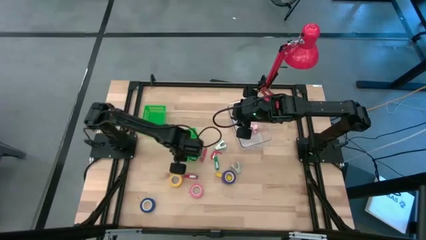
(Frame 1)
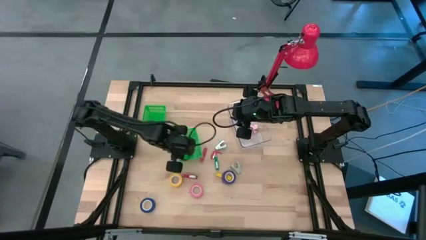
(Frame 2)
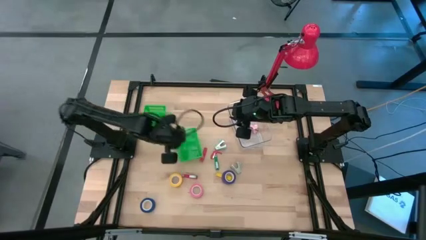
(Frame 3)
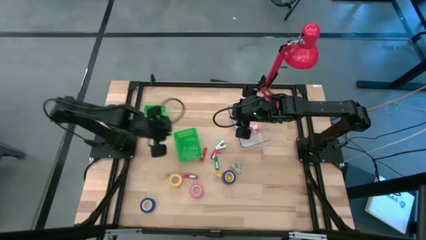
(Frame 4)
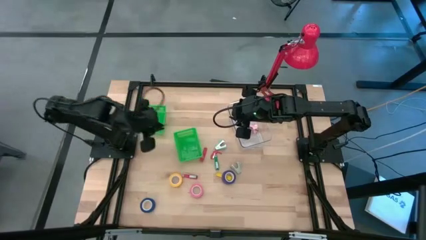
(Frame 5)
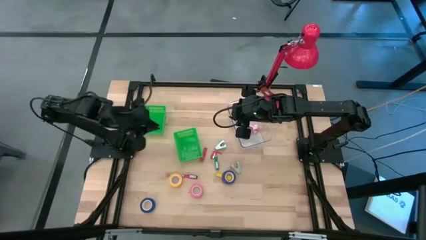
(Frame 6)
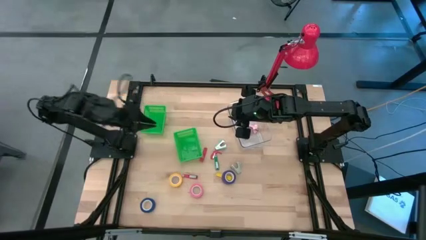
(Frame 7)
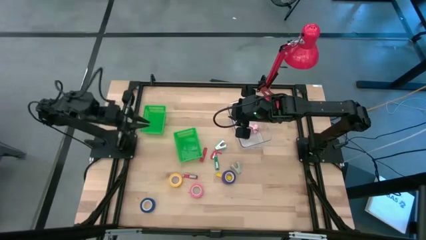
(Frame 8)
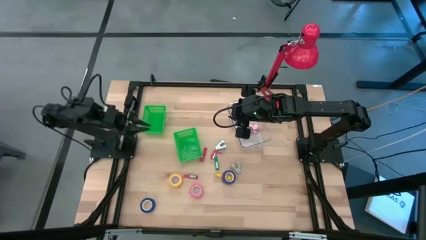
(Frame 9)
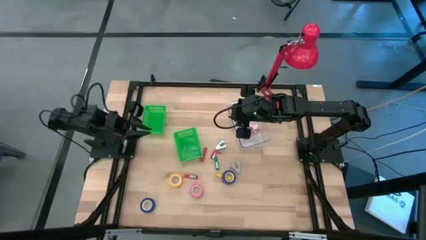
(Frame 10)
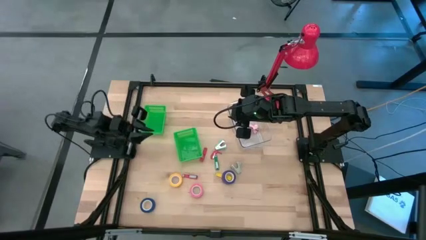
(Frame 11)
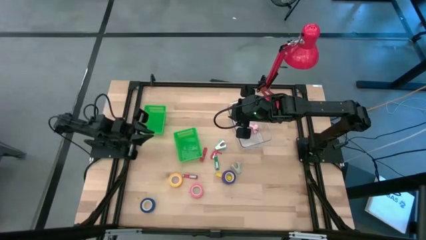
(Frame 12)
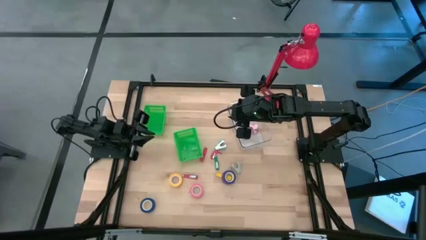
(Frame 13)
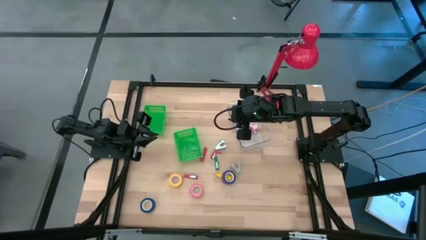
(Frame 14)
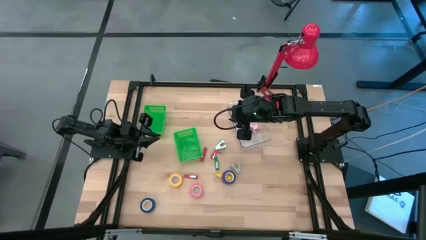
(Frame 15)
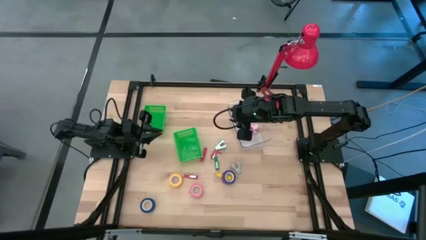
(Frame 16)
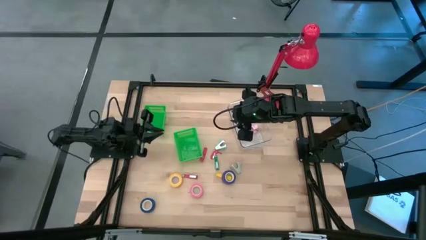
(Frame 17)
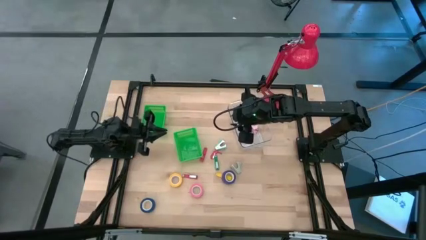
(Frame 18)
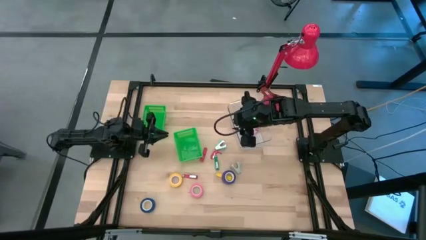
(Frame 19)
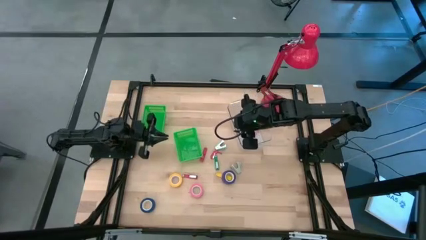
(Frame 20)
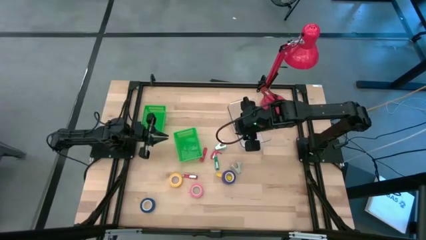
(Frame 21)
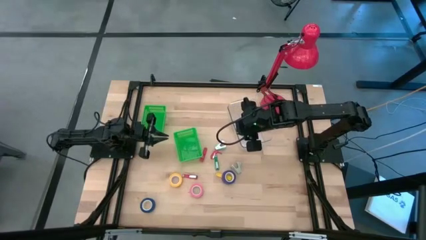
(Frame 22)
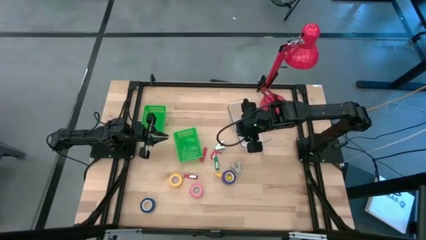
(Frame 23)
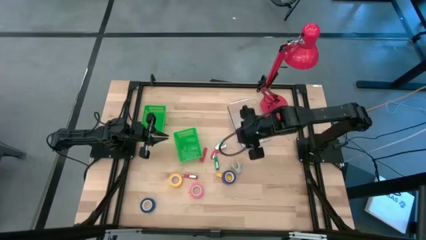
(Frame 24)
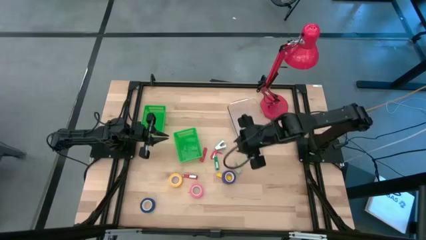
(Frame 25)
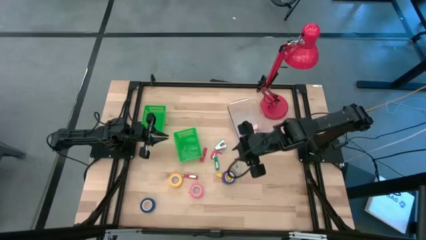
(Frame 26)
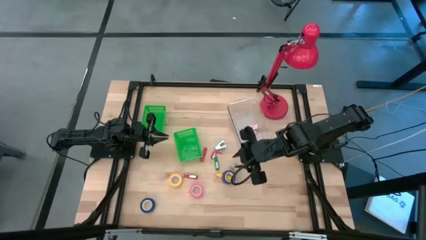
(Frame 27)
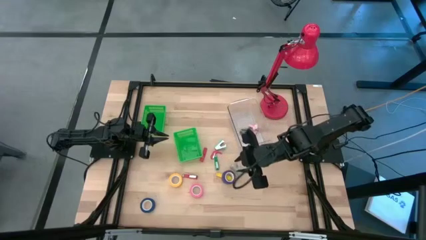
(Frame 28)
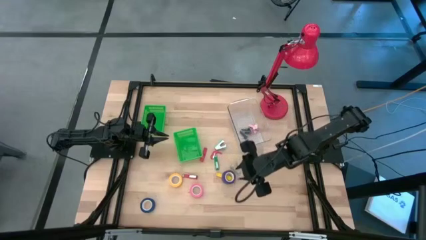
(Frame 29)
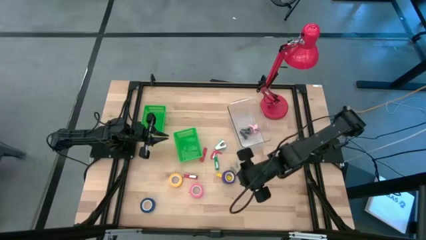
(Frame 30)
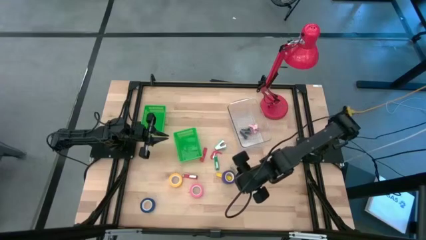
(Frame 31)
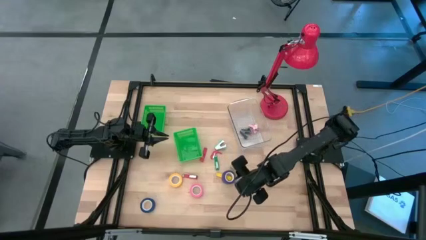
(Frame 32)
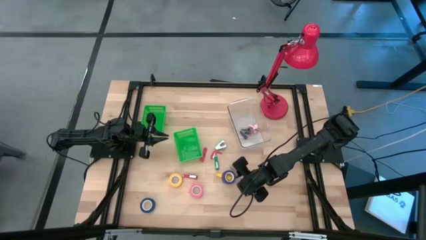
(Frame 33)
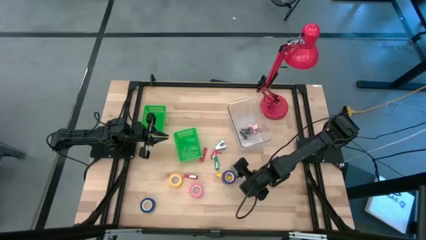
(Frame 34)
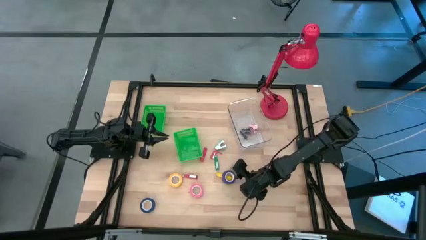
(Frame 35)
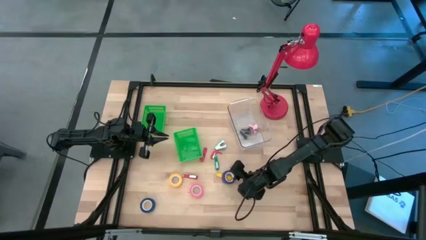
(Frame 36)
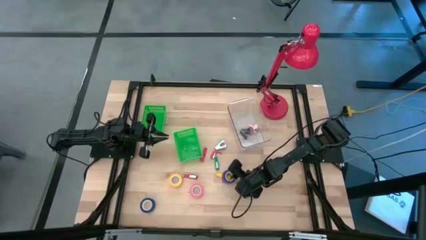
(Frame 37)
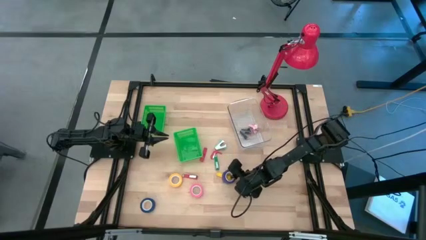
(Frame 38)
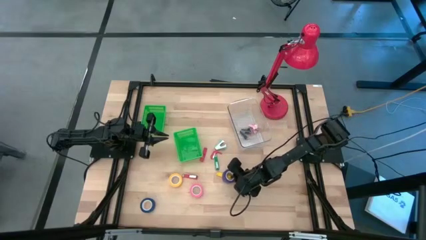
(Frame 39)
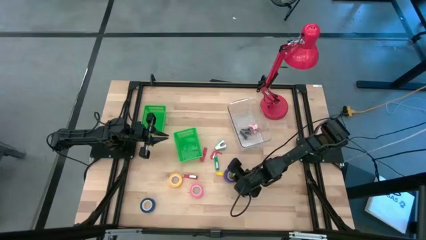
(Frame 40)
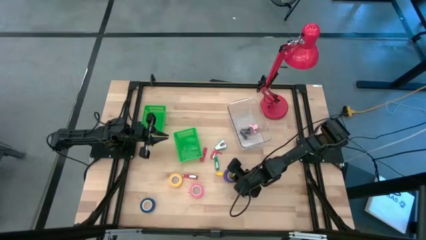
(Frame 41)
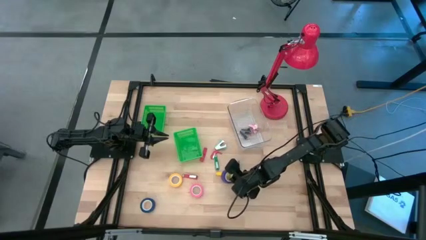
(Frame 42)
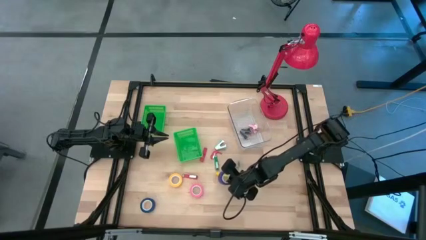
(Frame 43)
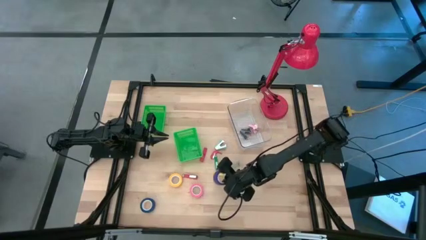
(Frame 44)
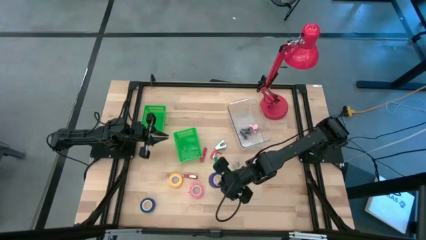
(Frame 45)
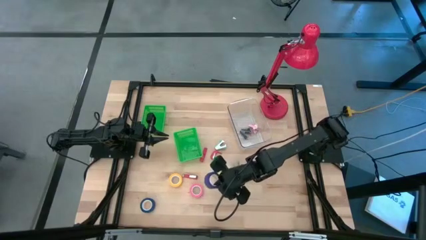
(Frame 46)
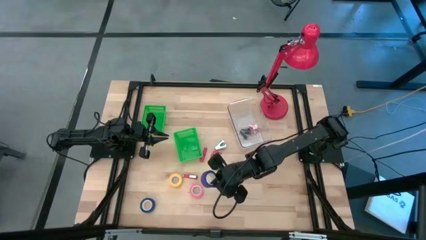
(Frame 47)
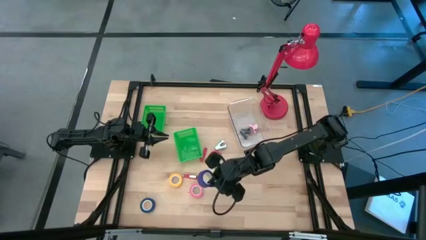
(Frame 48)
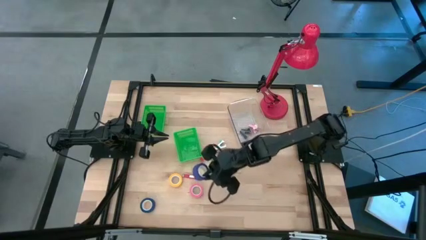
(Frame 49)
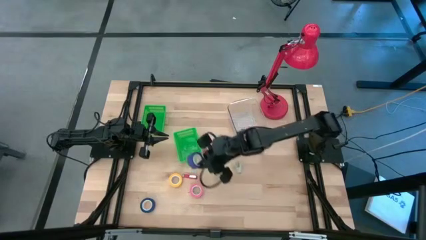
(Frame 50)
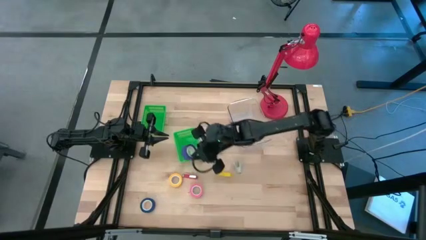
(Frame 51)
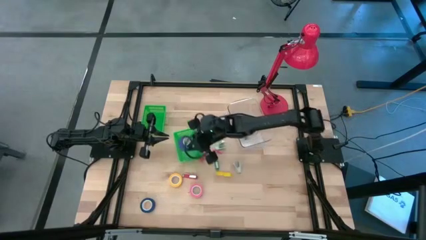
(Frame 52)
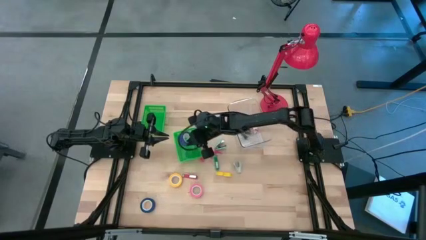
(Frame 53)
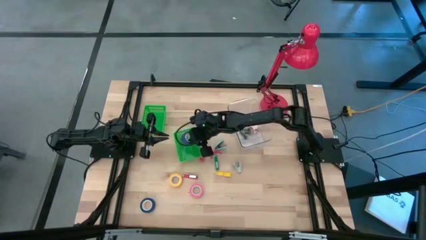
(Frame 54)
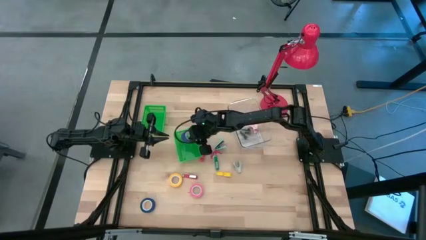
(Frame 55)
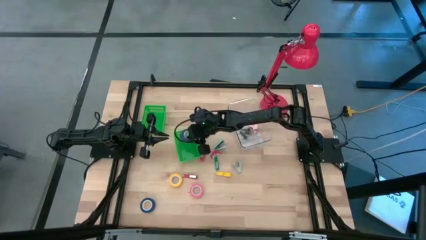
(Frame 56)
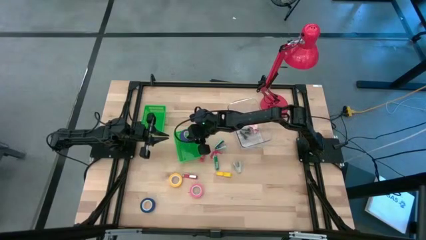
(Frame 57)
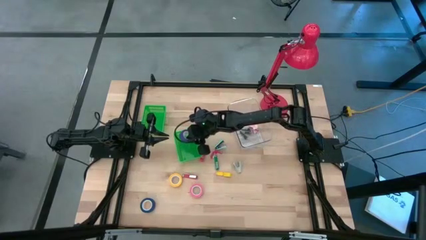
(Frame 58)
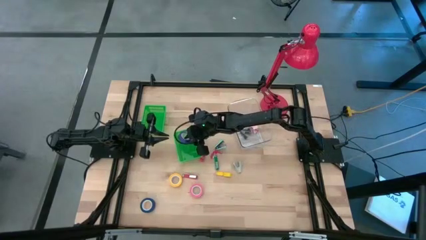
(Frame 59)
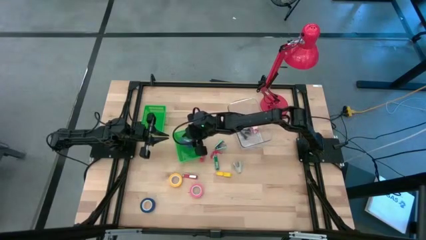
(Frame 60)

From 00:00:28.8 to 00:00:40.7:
Task: Pick and place Stapler, Stapler remover, tape
Put the green tape into the right green bin

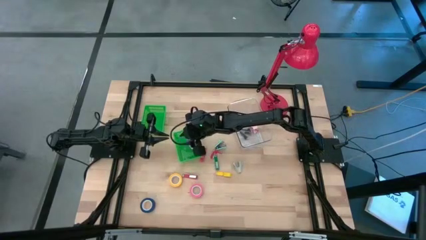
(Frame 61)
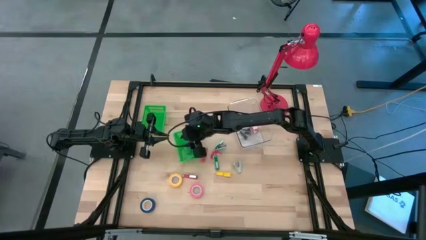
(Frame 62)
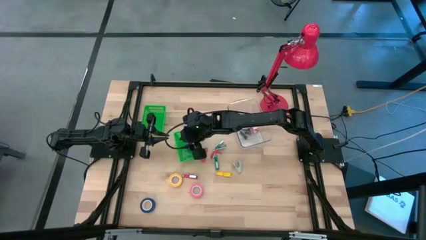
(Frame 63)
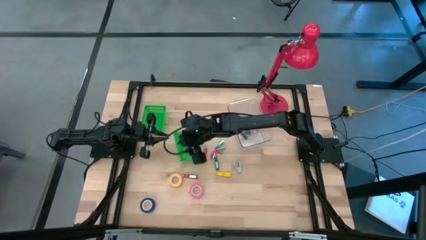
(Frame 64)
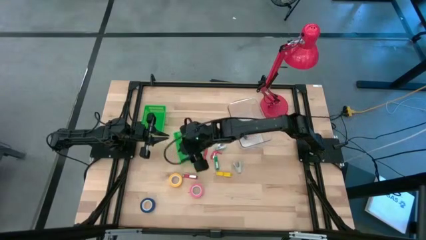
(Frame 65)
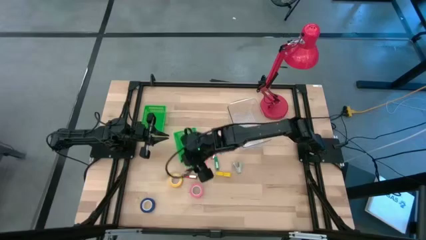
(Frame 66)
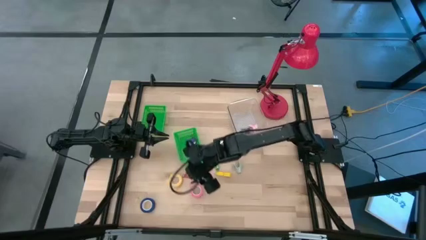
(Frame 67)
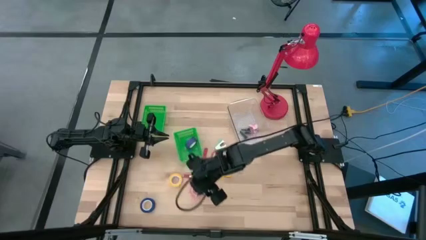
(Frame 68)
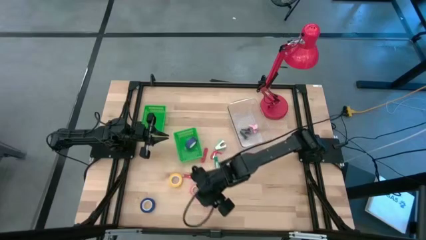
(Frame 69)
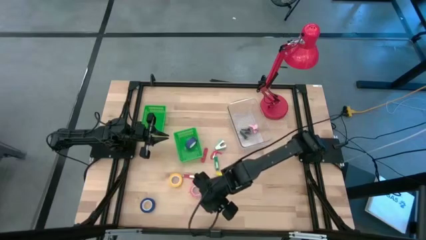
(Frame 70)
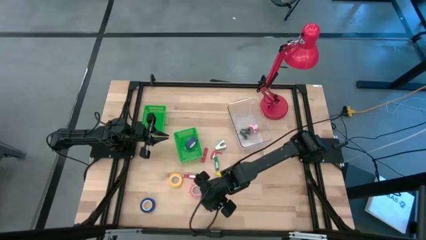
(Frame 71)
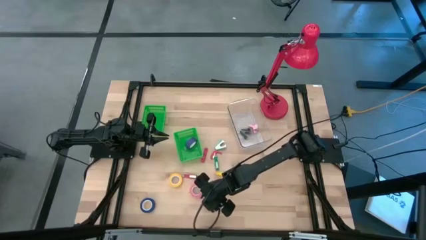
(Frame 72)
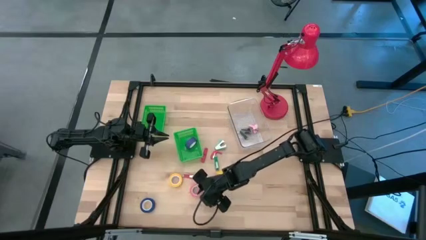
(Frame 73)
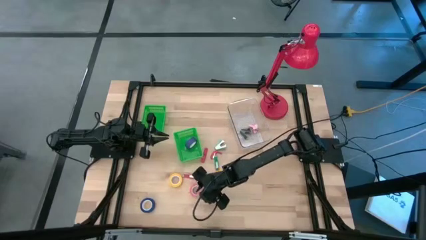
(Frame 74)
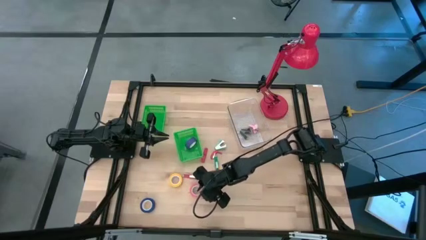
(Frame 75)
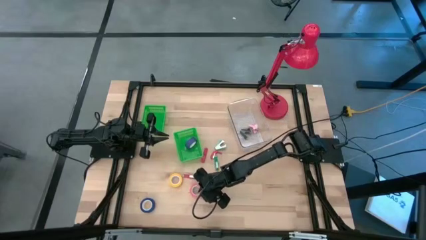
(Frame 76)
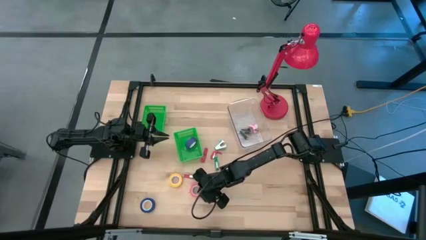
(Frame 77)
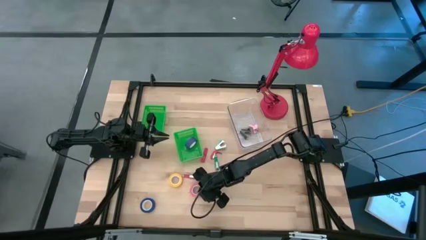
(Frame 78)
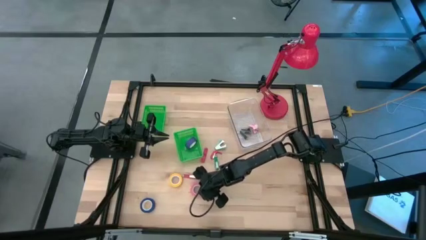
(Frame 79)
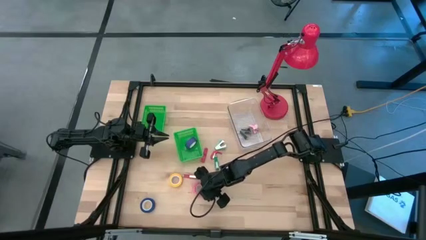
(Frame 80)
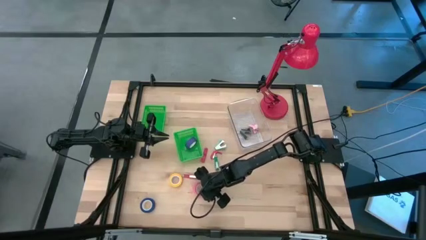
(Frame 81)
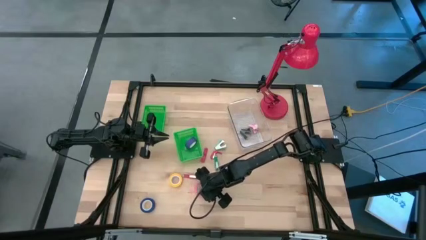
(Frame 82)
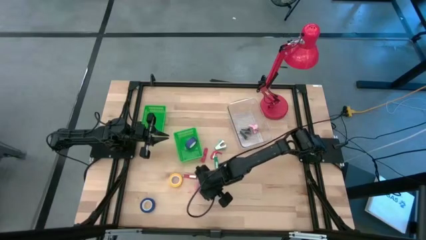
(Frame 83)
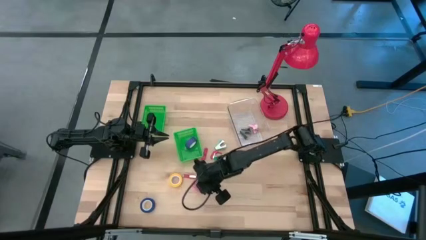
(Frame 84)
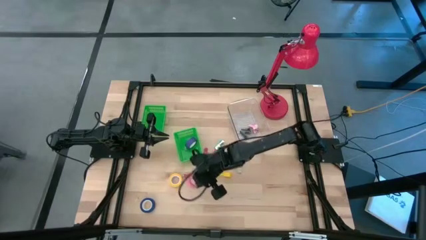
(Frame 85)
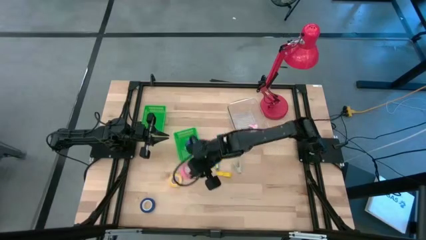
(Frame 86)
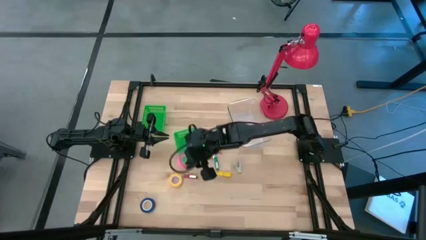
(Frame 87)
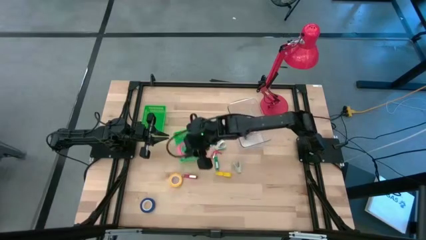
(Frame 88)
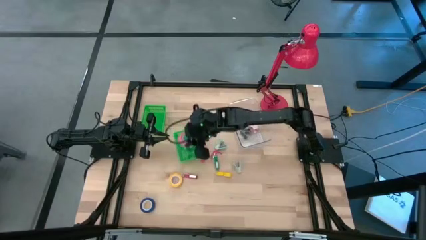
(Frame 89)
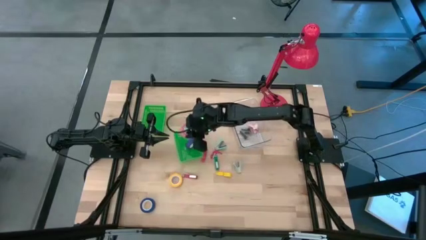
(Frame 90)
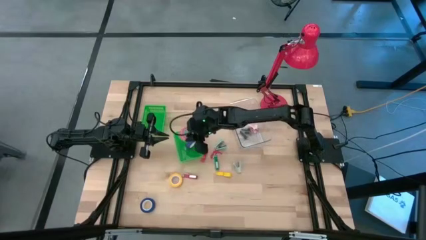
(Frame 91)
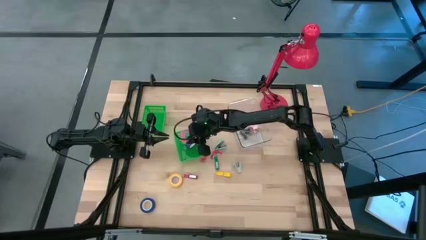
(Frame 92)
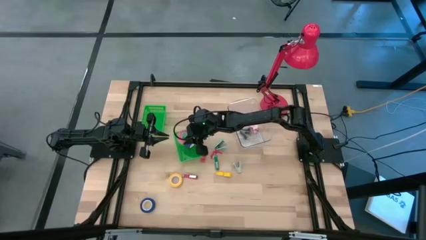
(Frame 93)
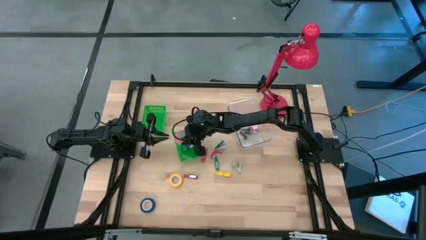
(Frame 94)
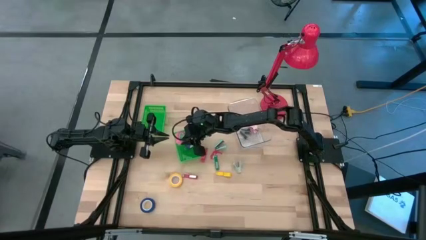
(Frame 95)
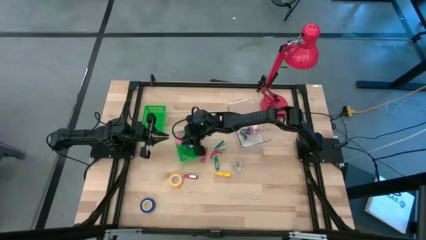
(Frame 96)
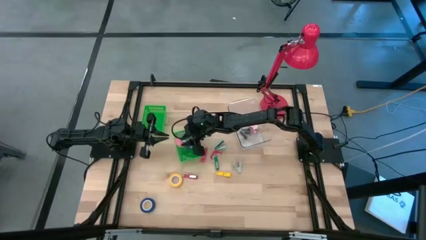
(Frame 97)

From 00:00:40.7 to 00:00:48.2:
Put the pink tape into the right green bin
